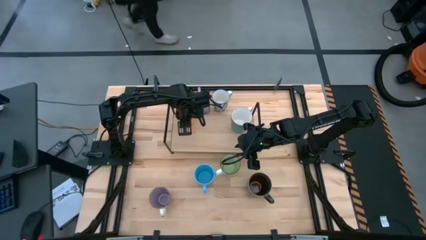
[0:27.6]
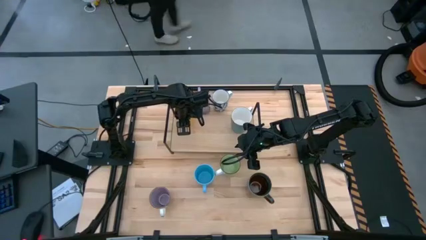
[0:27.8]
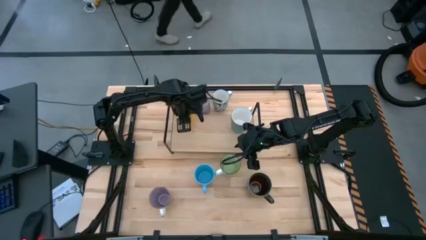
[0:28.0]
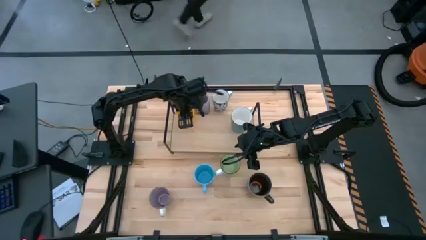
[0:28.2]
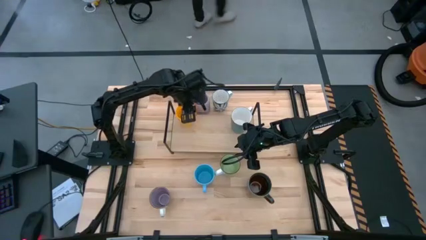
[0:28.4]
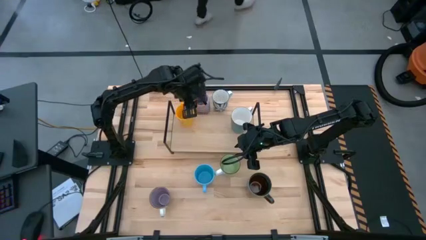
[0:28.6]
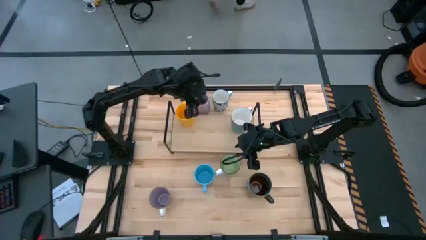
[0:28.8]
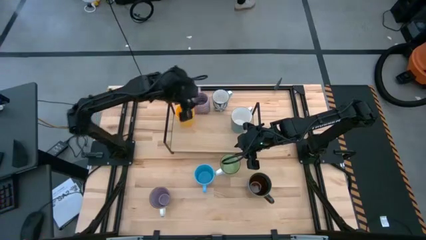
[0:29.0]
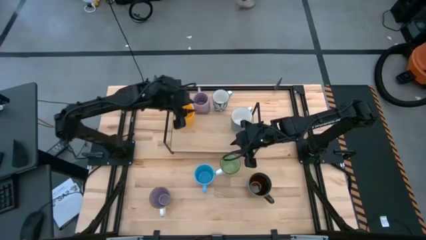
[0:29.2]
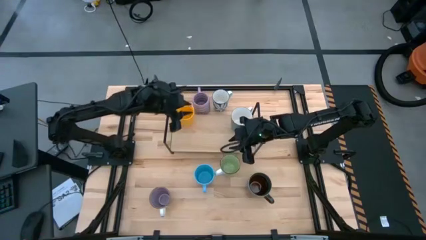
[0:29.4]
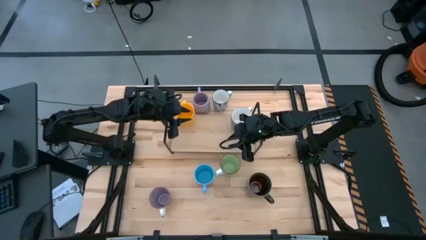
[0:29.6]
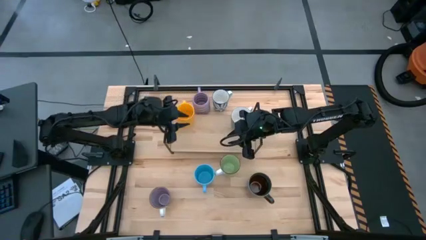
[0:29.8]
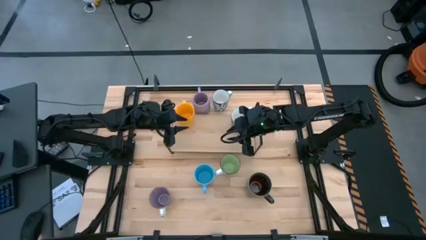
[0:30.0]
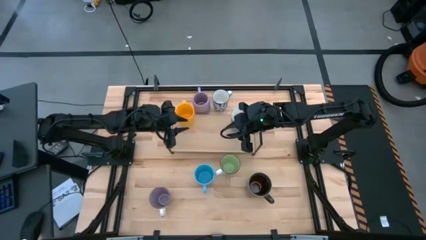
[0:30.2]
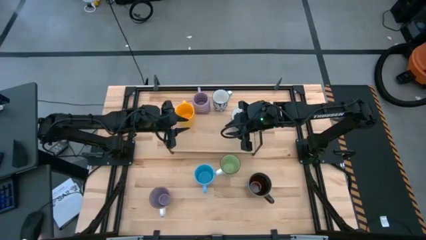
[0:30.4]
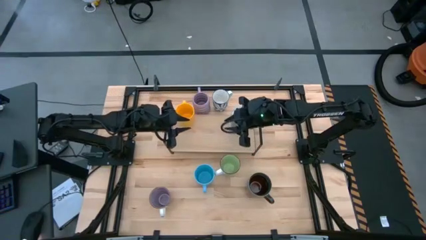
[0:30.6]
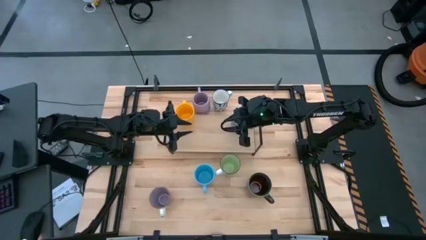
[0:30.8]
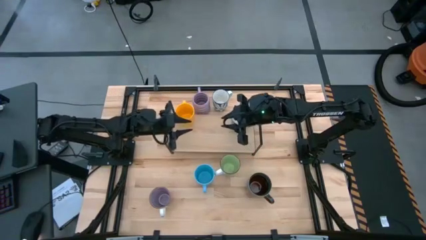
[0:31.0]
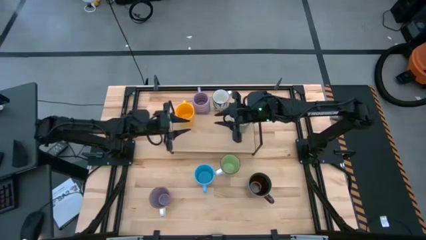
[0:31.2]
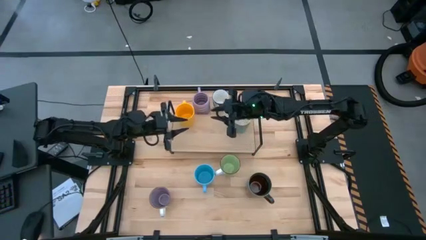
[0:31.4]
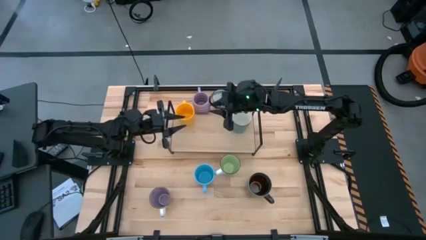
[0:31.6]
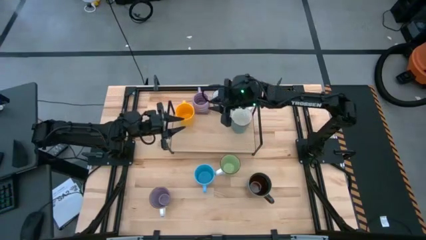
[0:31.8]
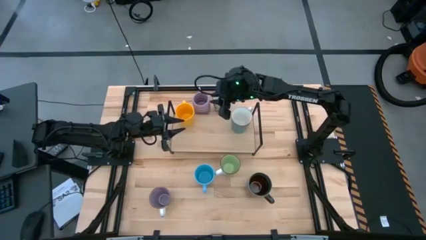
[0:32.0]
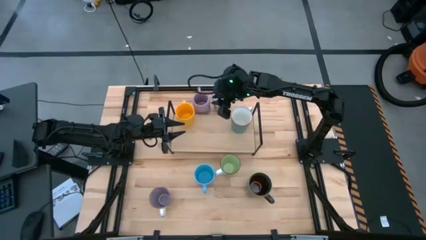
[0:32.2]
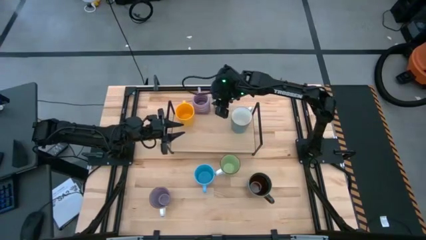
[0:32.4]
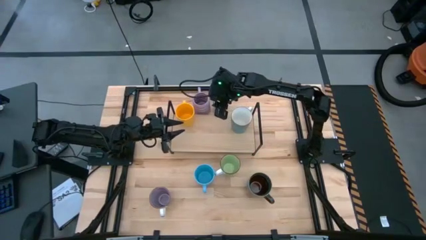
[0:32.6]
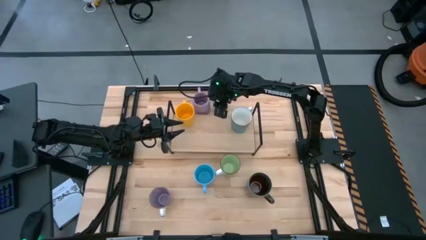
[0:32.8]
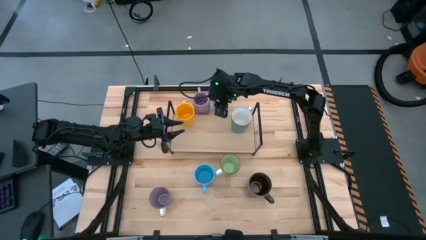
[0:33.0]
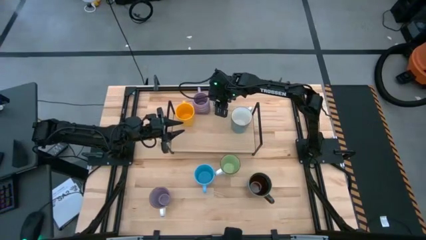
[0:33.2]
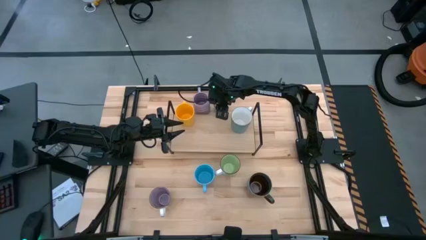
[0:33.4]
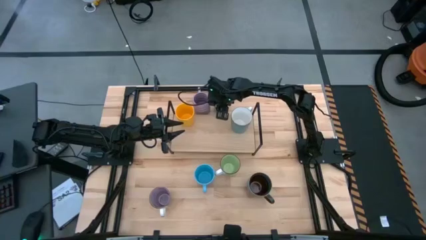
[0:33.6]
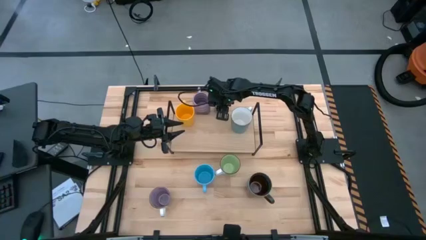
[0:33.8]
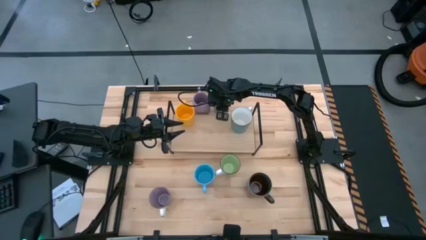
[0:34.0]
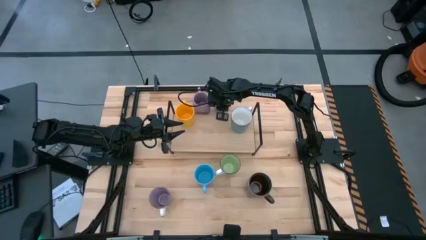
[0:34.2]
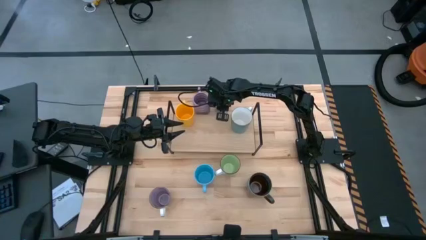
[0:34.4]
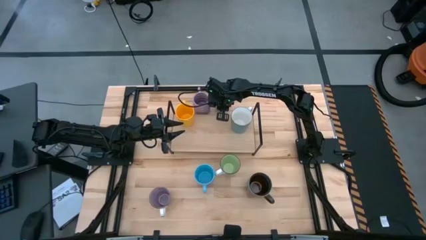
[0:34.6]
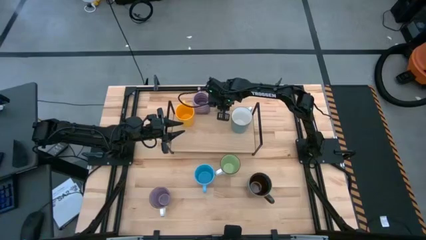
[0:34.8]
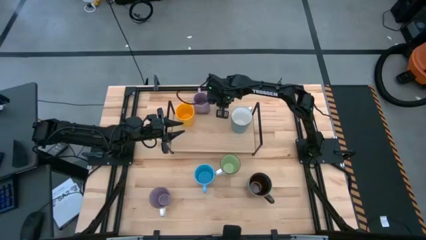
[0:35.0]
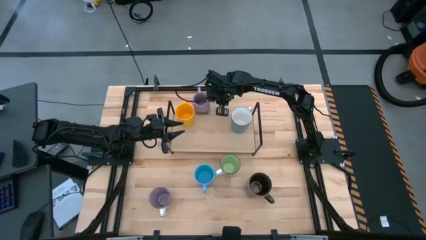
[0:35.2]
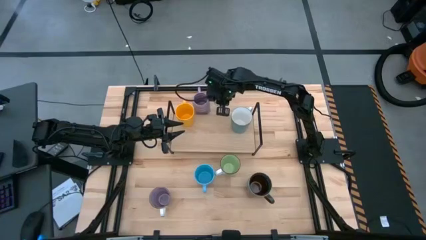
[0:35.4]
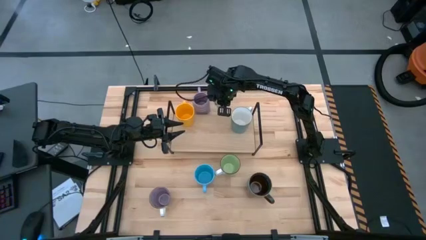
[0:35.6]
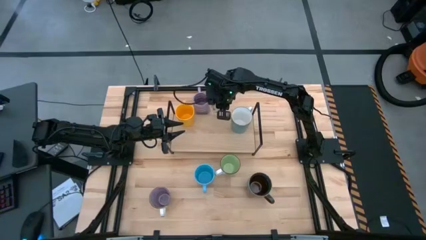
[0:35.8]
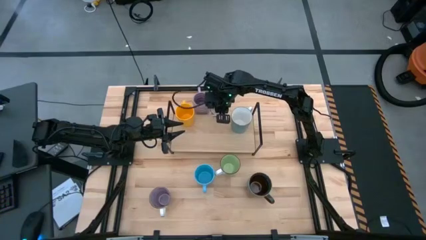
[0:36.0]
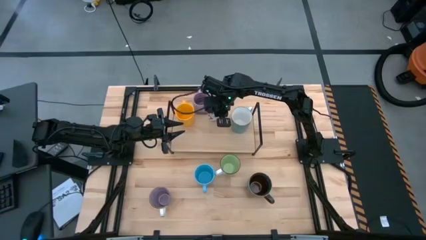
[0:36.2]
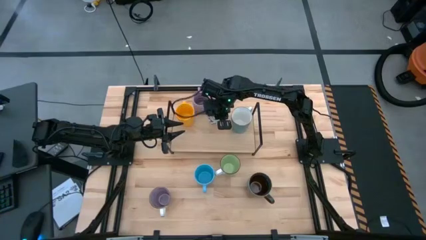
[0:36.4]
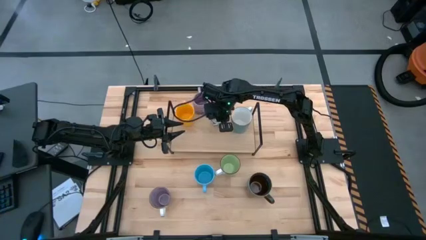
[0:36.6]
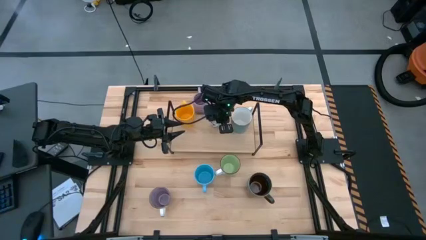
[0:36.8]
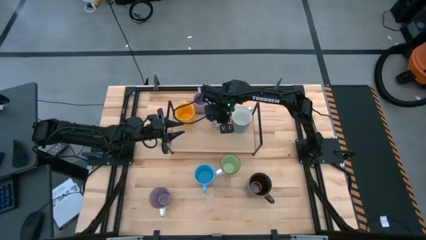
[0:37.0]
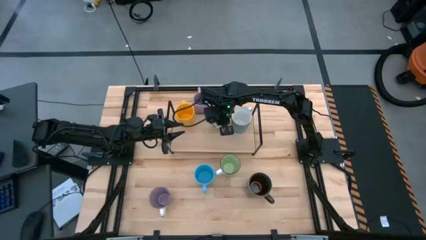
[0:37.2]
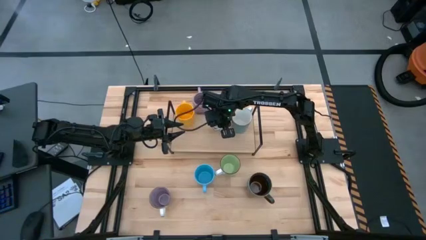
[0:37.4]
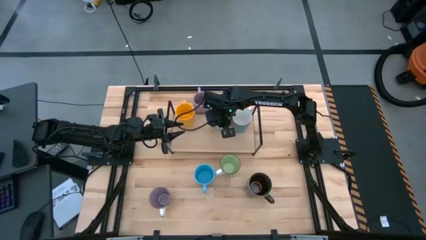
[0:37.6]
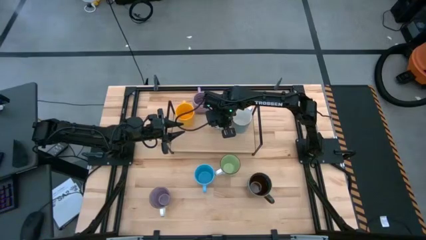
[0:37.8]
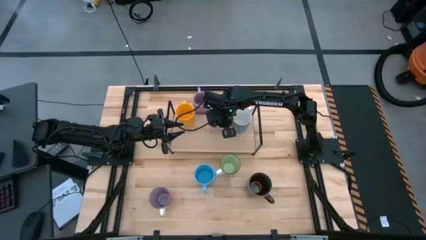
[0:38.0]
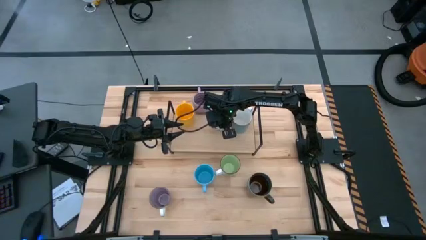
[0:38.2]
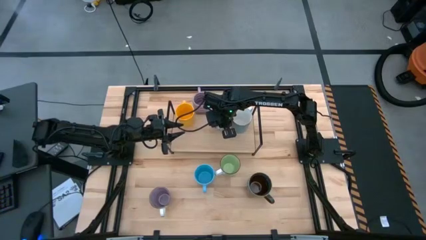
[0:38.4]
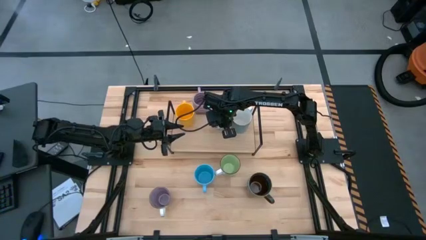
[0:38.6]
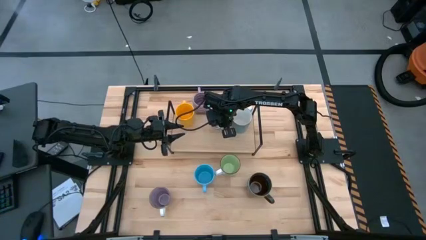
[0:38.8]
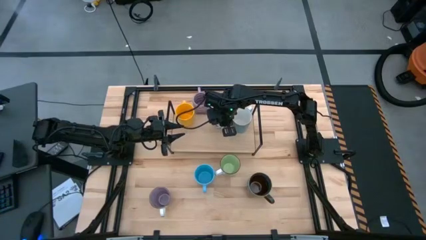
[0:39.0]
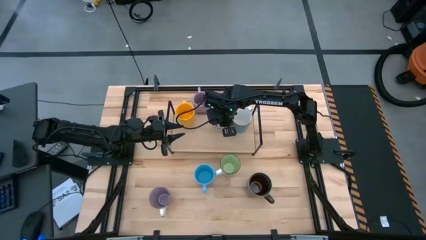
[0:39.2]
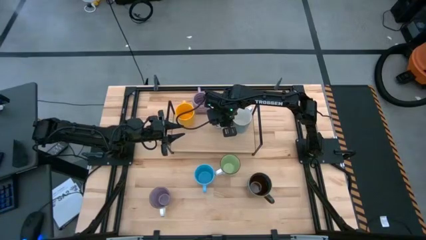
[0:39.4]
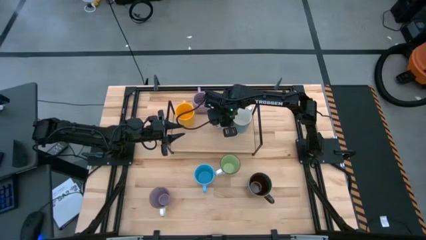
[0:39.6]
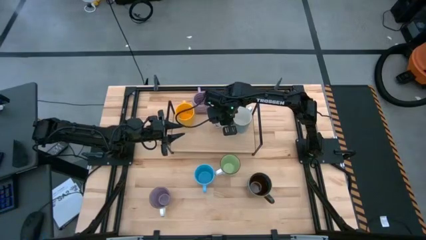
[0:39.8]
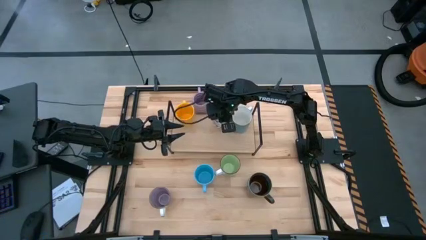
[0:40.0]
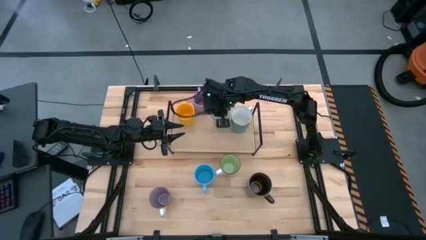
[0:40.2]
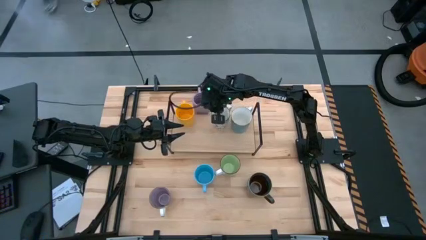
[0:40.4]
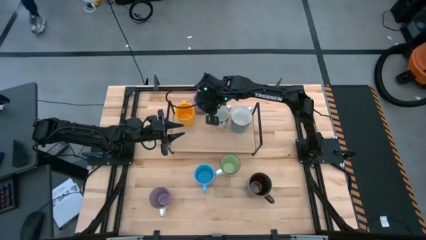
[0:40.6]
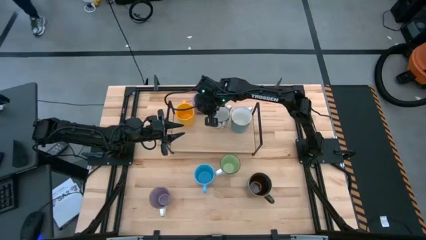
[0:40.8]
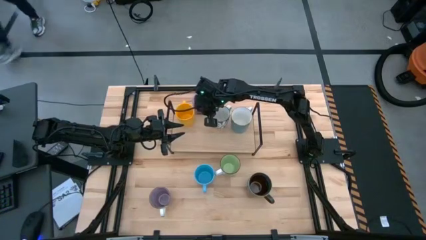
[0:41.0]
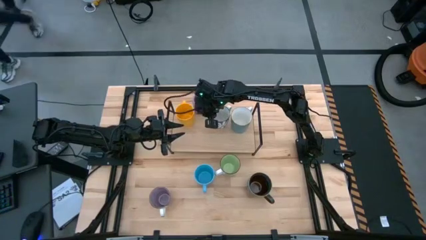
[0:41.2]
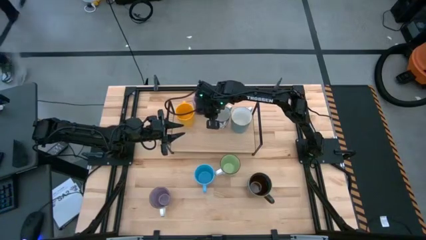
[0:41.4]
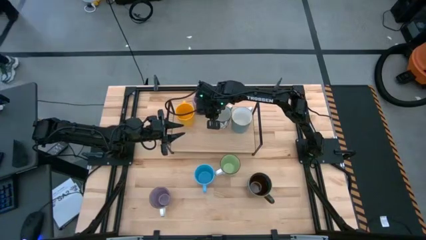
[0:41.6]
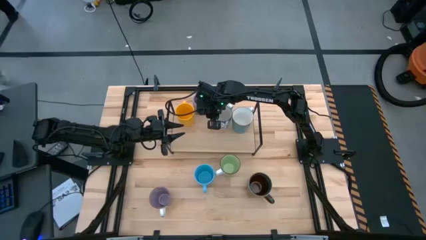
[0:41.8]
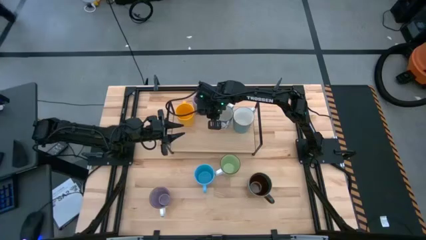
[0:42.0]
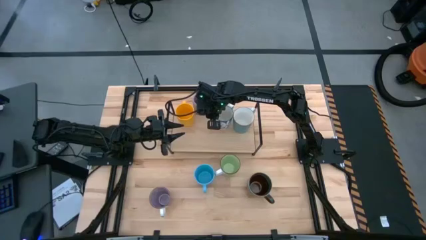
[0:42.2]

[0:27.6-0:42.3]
Task: Place coffee mugs
Put the white mug on the shelf
